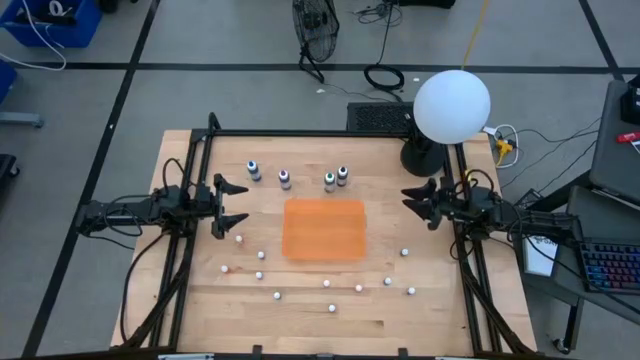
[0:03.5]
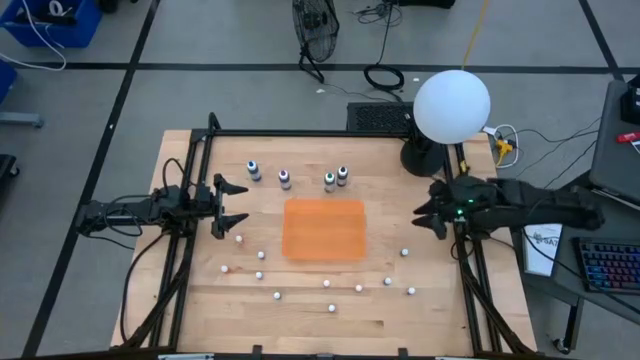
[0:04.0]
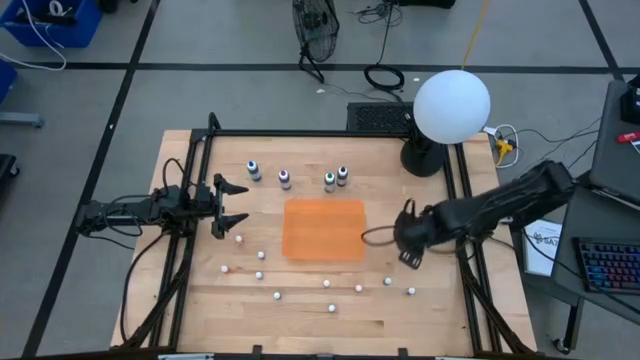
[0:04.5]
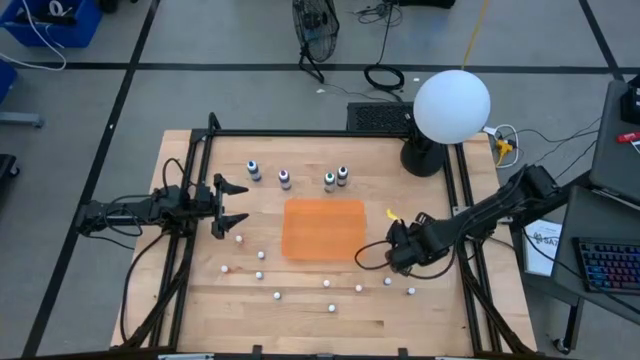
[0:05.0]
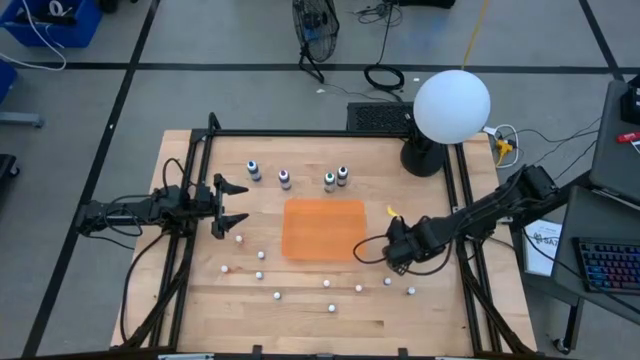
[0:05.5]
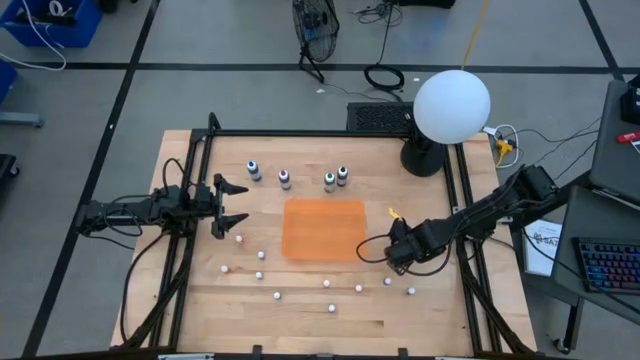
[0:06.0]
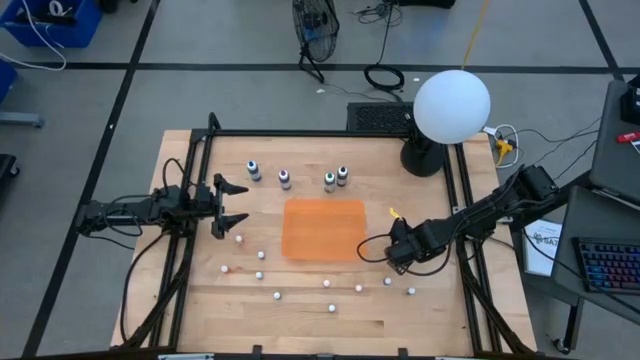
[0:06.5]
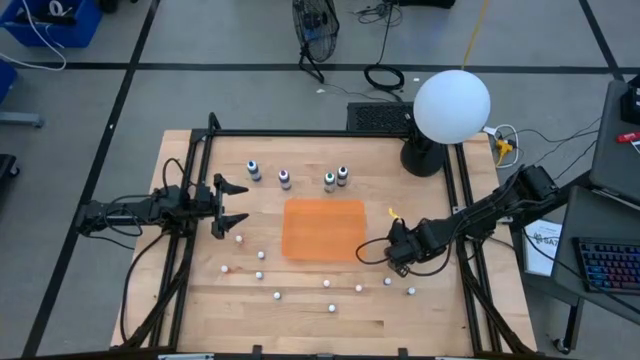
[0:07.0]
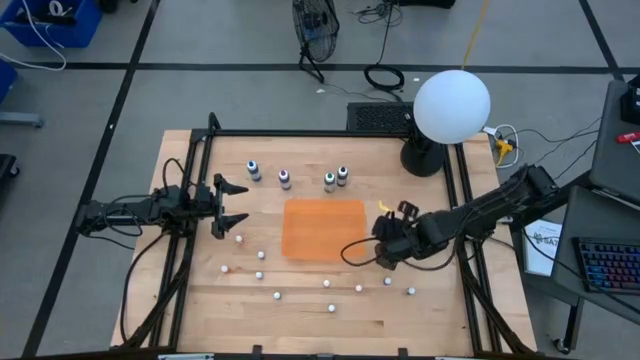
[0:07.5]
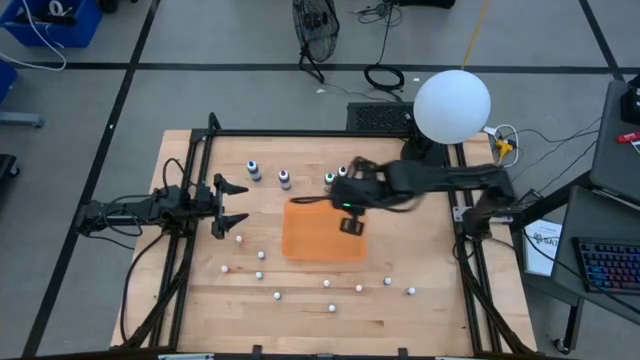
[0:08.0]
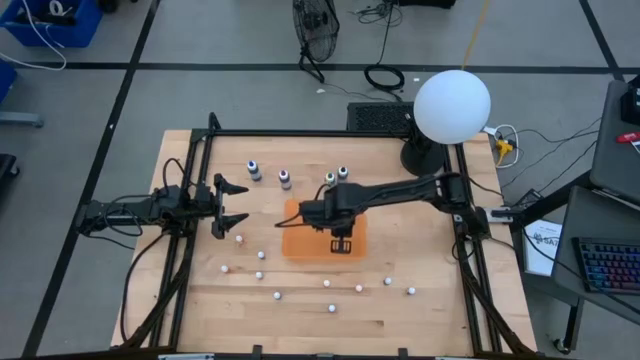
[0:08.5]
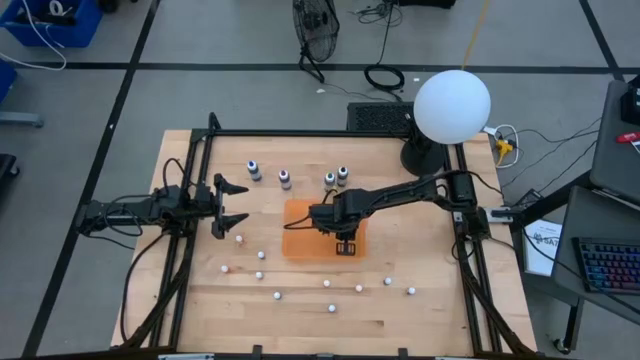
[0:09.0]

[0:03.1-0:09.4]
Task: Pick & Place food coloring
Put the small green food coloring bottle into the orange bin

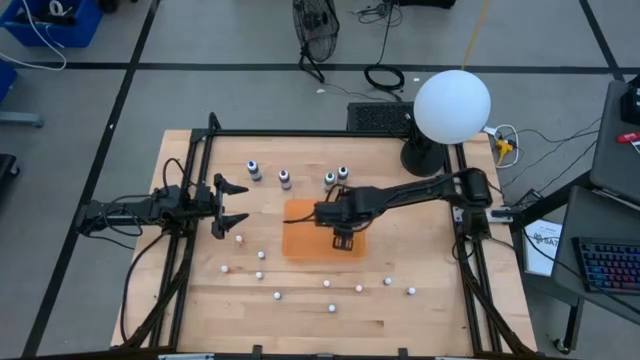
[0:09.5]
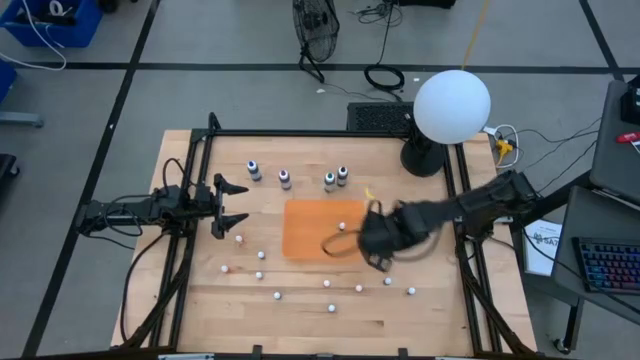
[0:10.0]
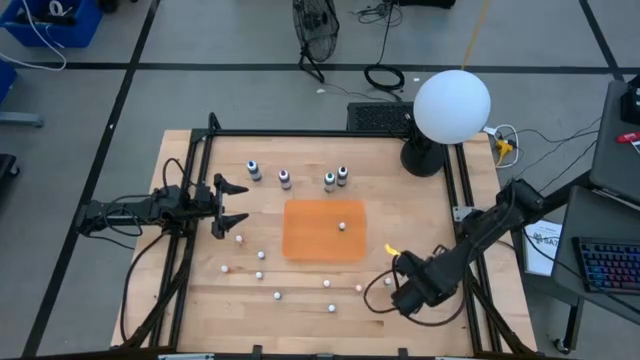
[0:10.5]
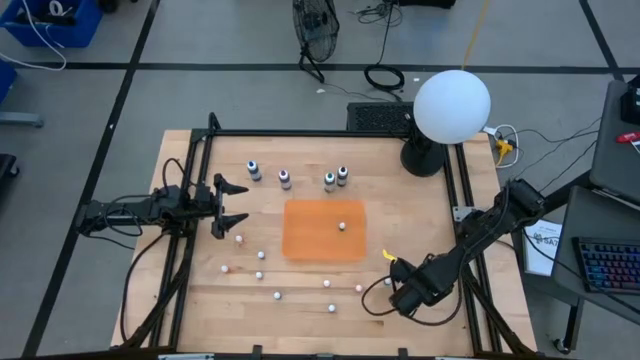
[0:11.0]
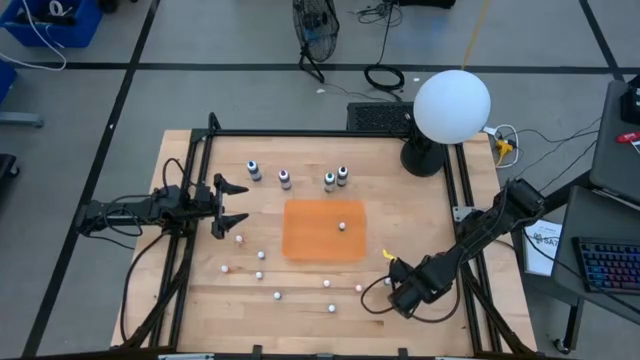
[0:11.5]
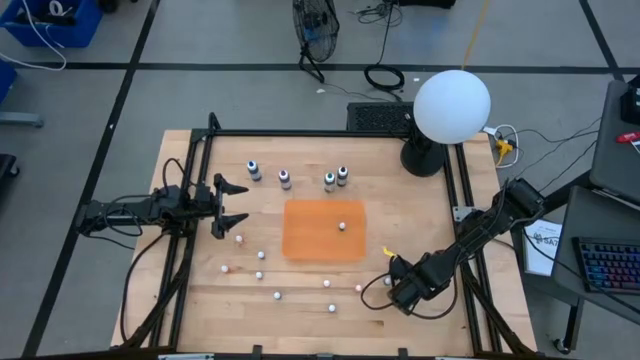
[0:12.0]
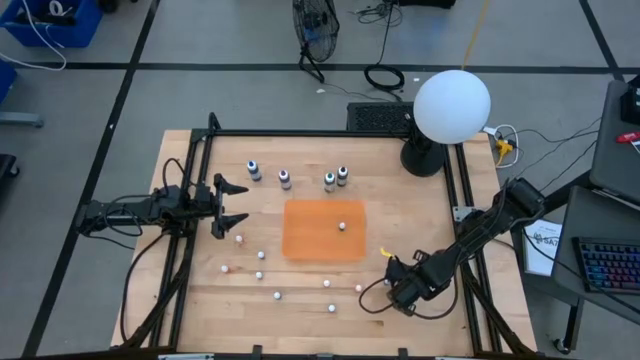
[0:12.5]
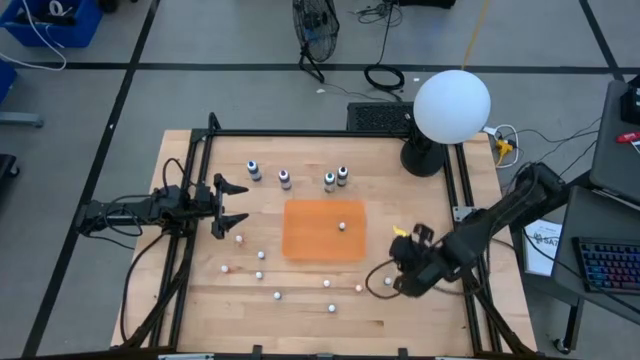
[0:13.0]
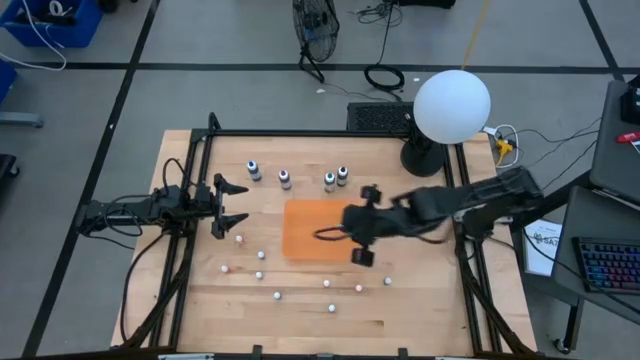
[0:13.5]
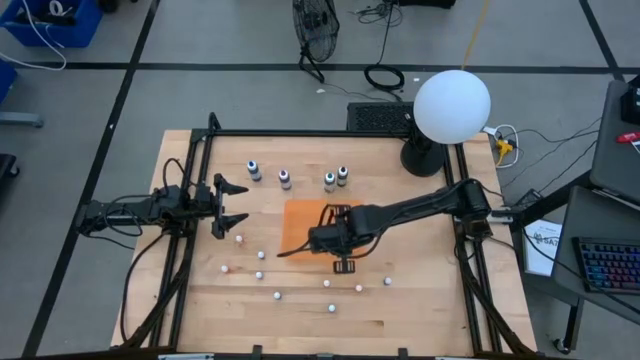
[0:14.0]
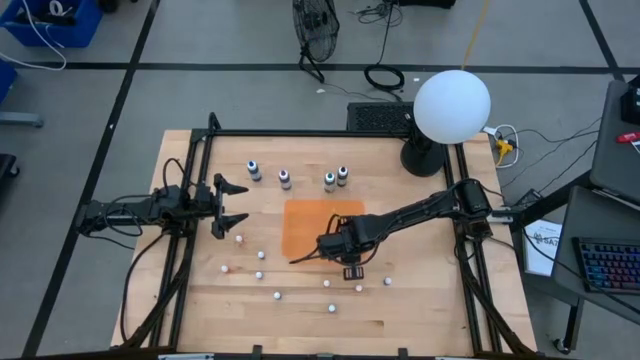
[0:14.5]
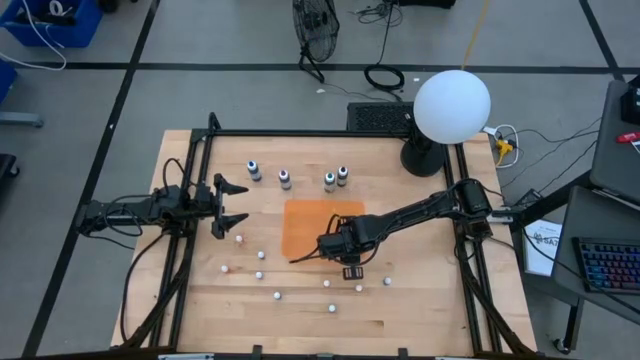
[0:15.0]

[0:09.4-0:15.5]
Put the small red food coloring bottle into the orange bin

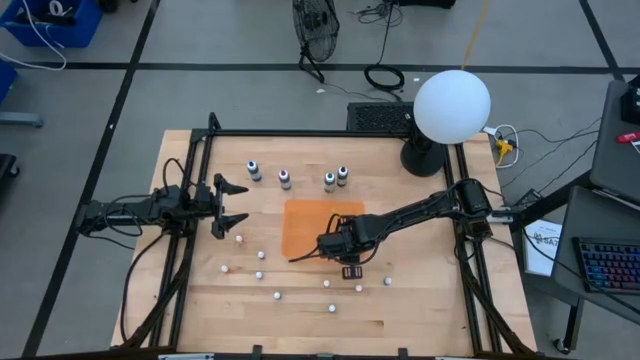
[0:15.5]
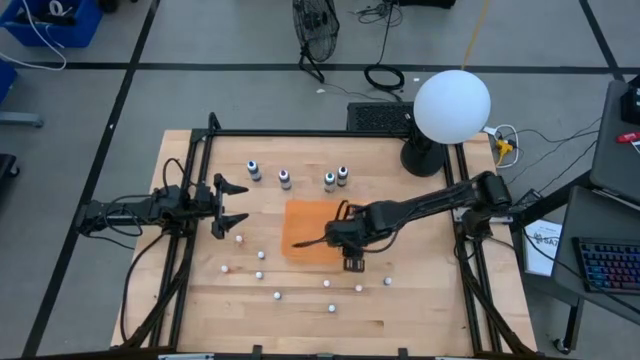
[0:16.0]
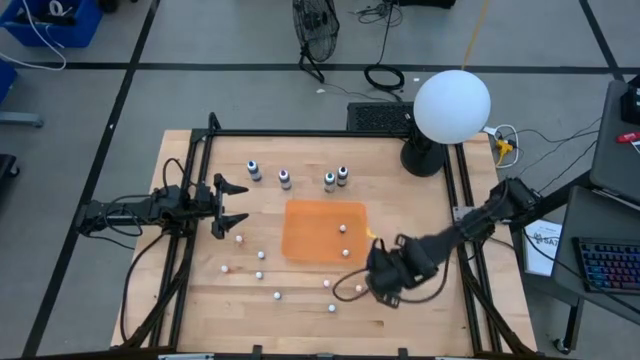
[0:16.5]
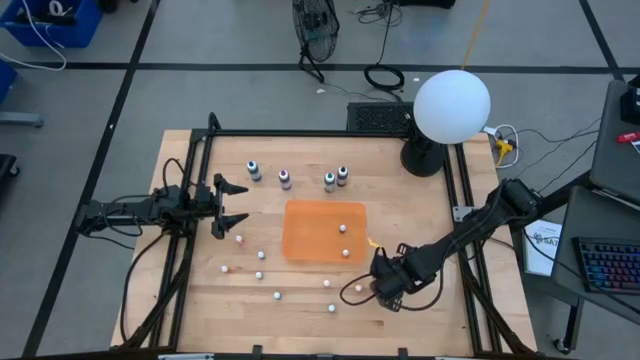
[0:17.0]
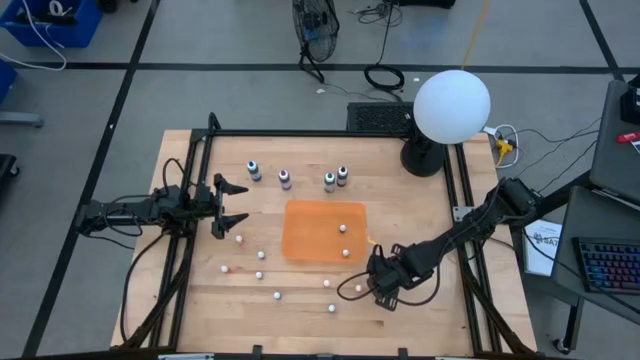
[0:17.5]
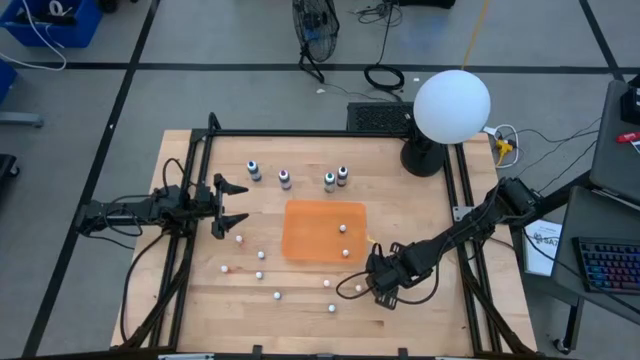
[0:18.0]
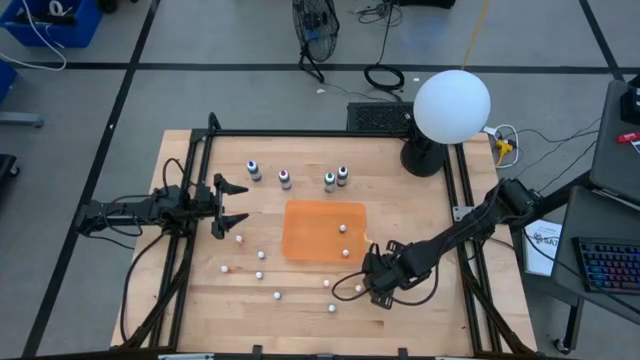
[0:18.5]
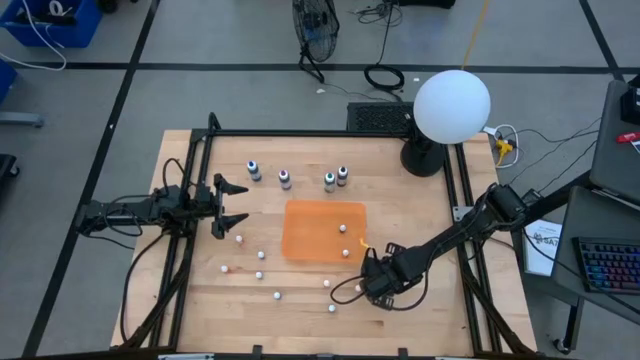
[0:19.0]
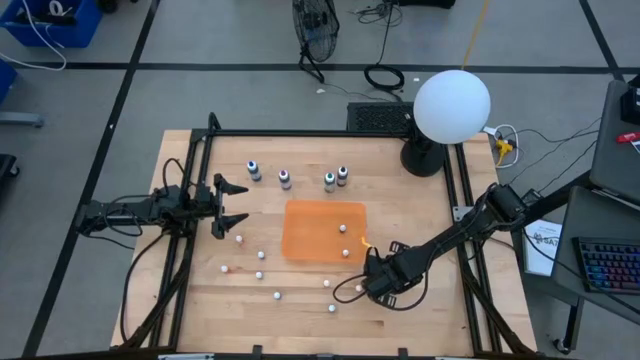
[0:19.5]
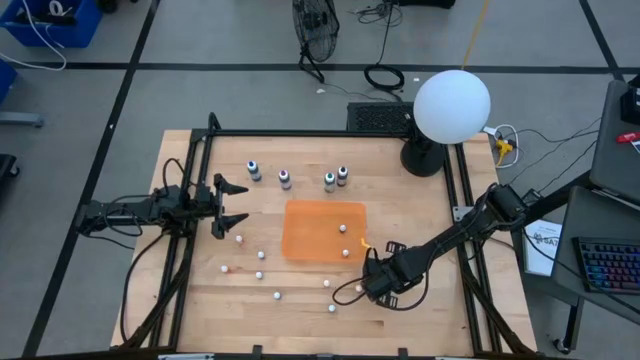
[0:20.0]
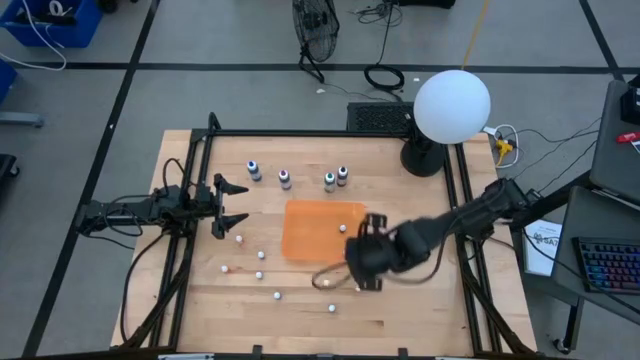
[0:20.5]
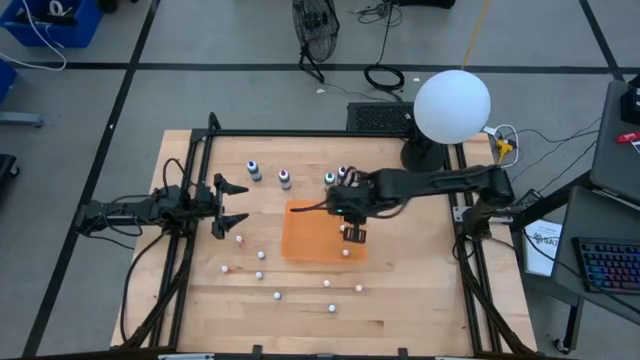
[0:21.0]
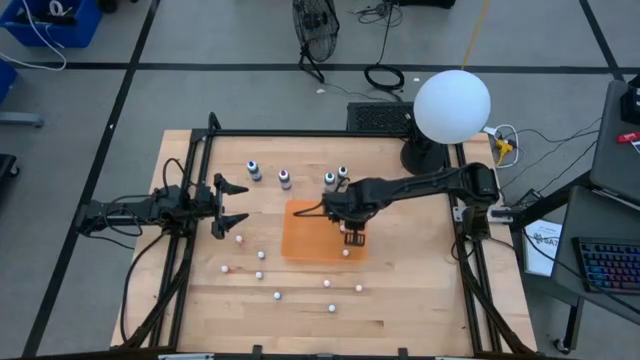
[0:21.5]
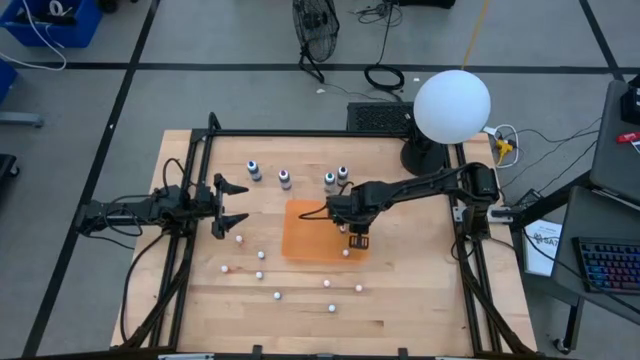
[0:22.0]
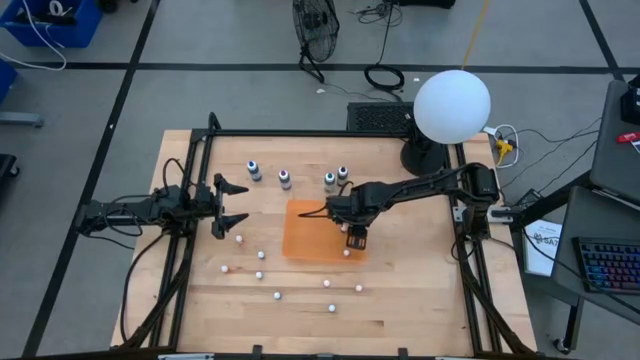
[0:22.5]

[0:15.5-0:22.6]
Put the small blue food coloring bottle into the orange bin

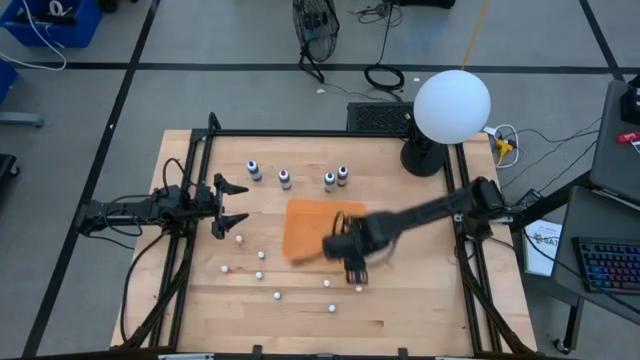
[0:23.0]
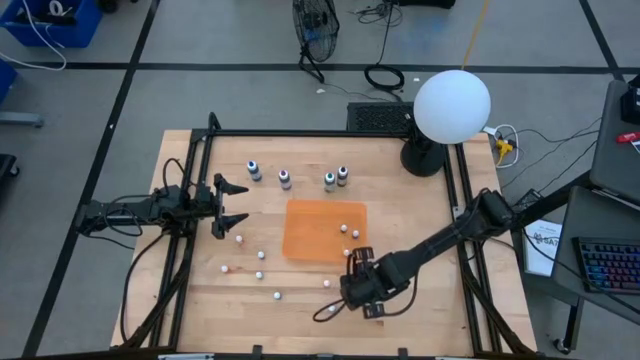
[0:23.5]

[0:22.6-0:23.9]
Put the small orange food coloring bottle into the orange bin
